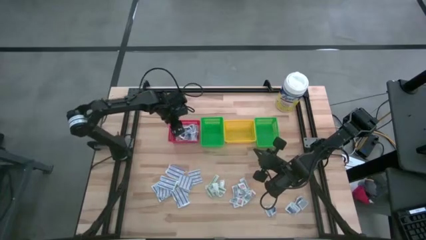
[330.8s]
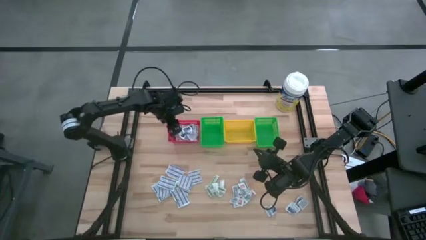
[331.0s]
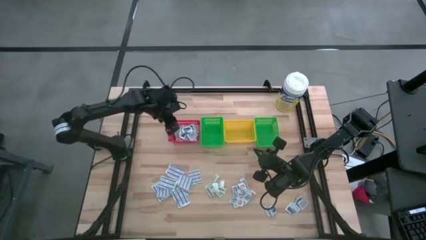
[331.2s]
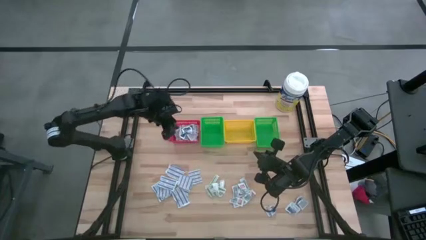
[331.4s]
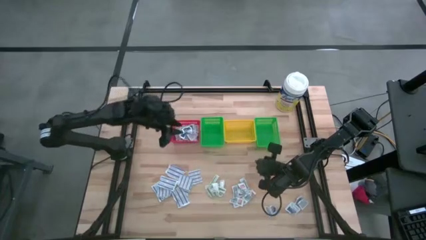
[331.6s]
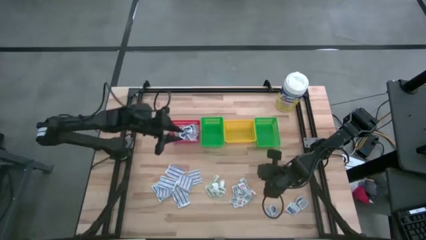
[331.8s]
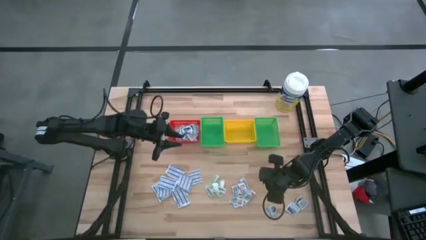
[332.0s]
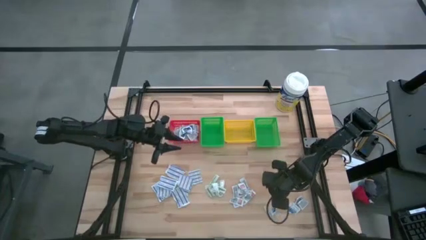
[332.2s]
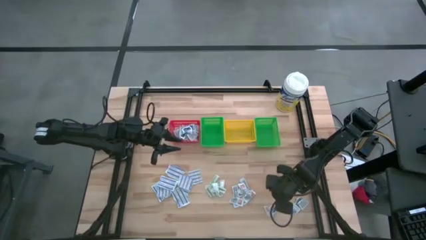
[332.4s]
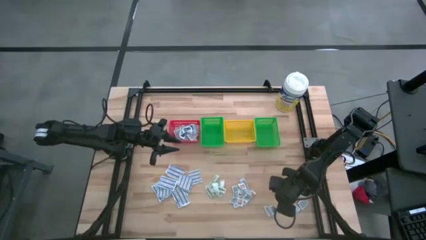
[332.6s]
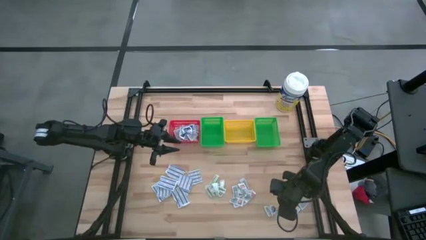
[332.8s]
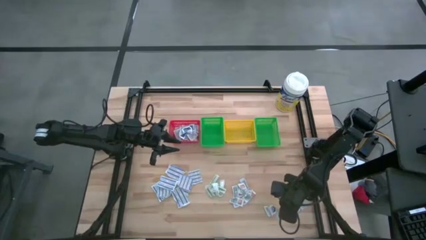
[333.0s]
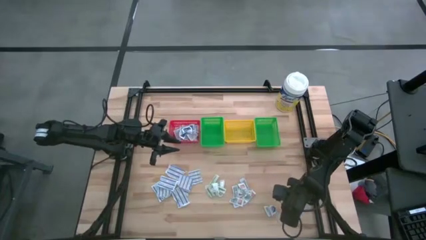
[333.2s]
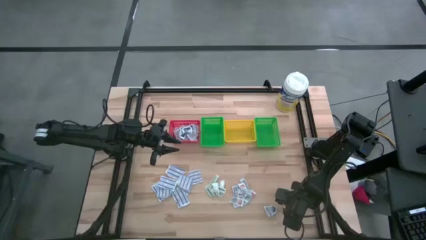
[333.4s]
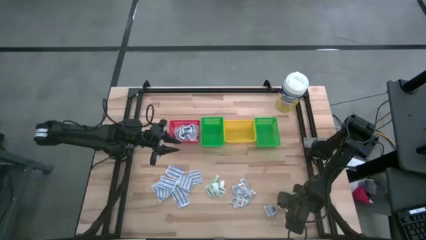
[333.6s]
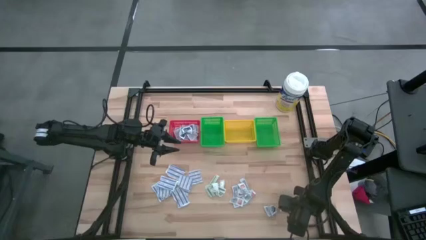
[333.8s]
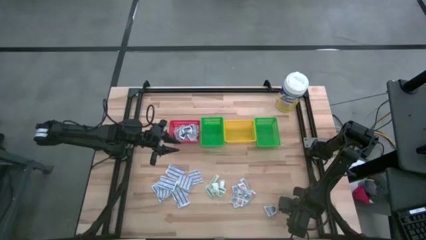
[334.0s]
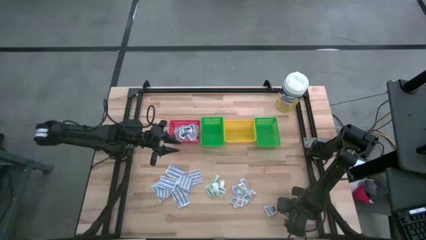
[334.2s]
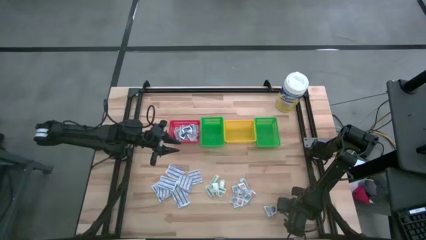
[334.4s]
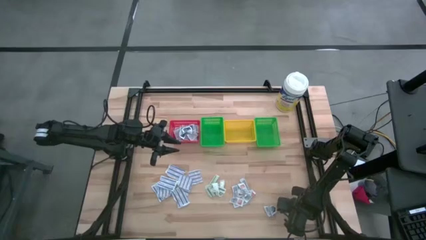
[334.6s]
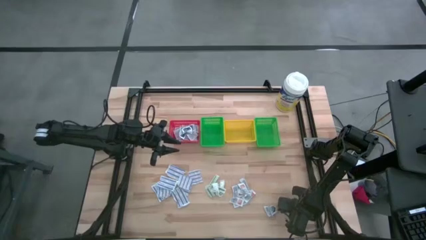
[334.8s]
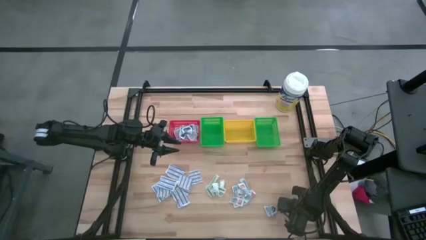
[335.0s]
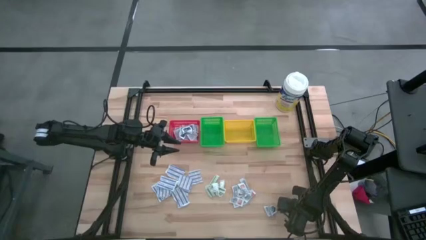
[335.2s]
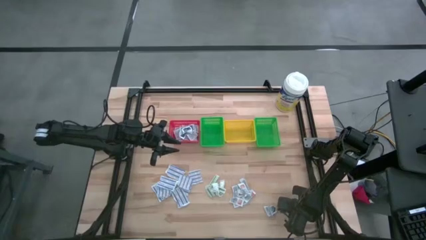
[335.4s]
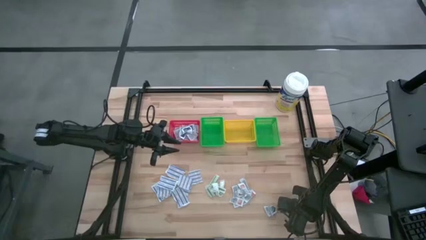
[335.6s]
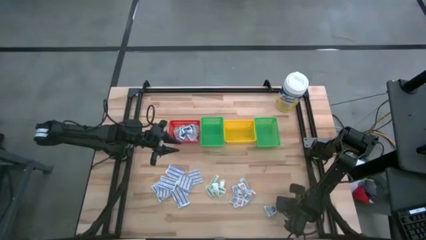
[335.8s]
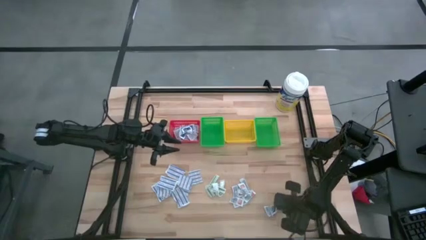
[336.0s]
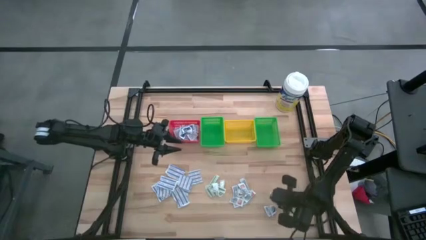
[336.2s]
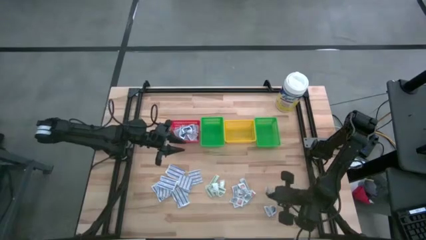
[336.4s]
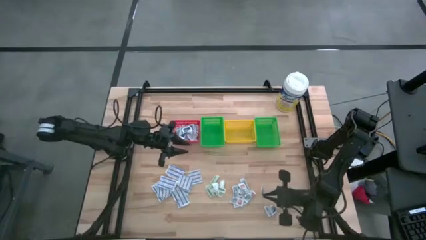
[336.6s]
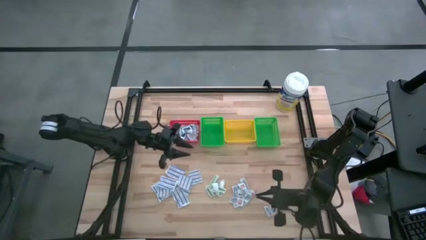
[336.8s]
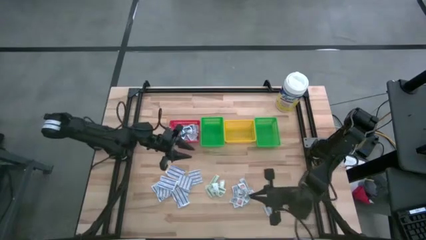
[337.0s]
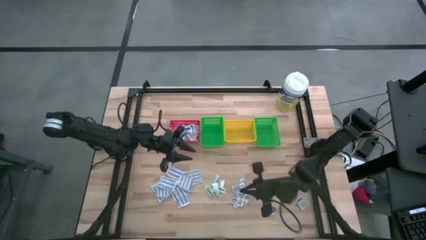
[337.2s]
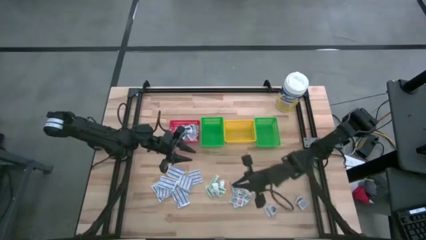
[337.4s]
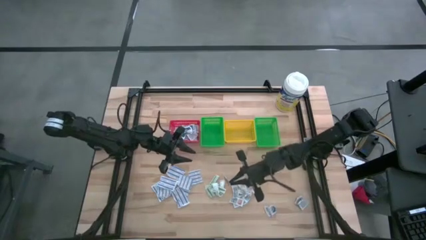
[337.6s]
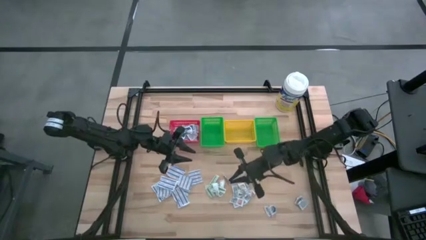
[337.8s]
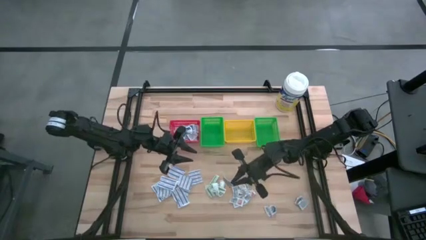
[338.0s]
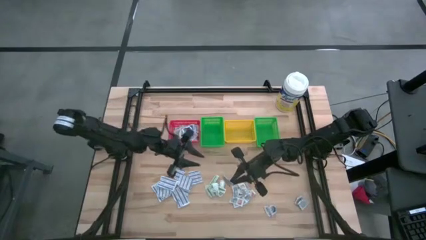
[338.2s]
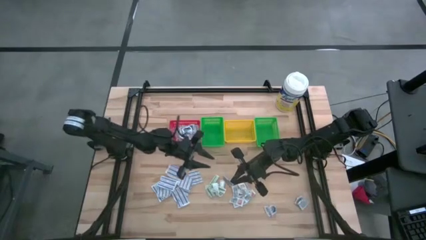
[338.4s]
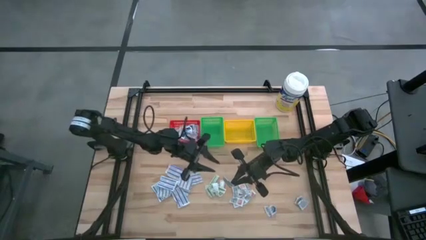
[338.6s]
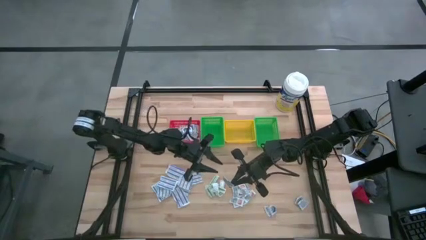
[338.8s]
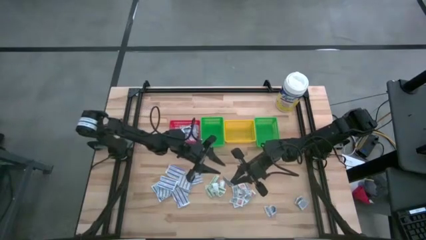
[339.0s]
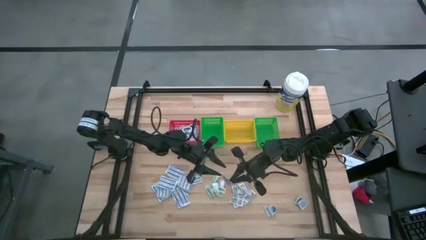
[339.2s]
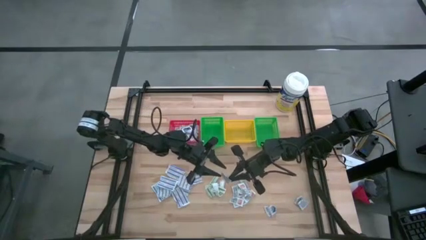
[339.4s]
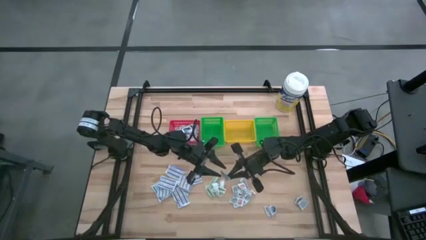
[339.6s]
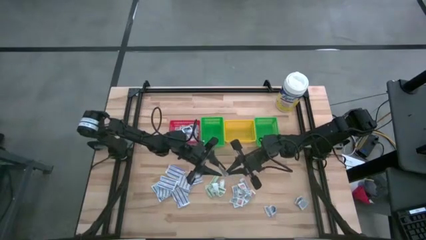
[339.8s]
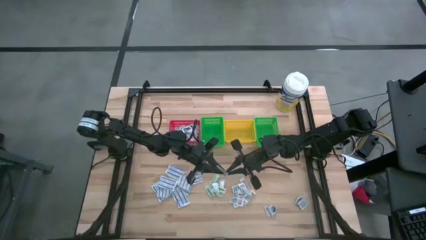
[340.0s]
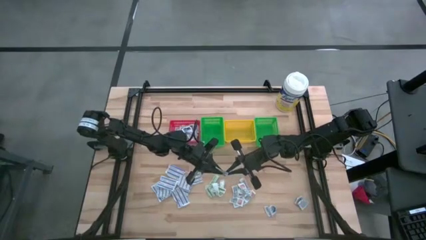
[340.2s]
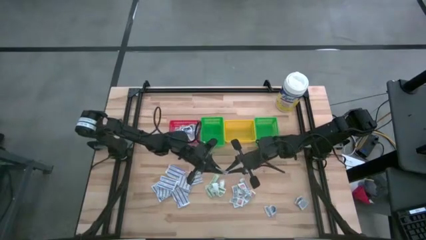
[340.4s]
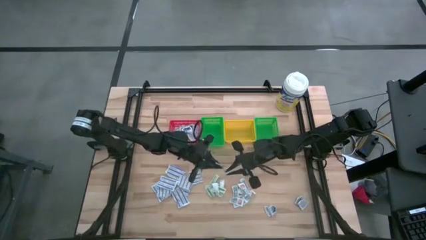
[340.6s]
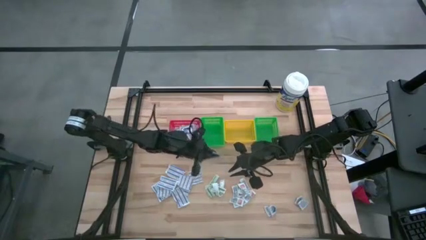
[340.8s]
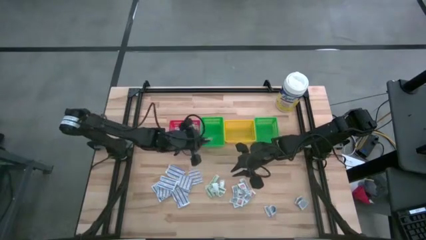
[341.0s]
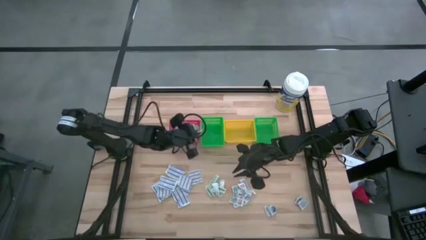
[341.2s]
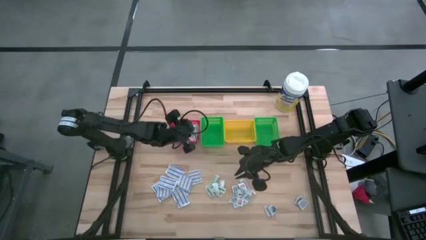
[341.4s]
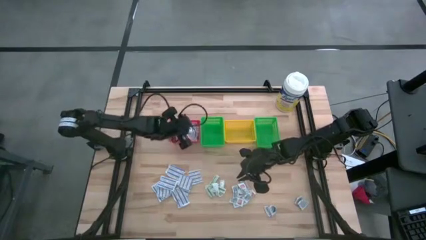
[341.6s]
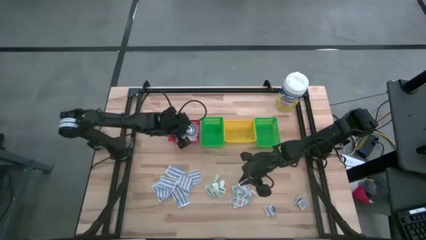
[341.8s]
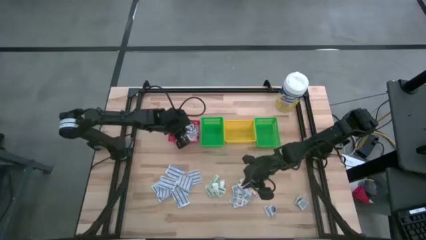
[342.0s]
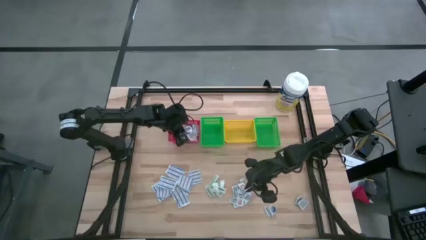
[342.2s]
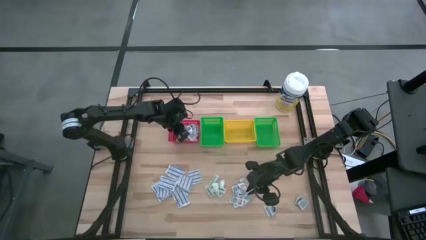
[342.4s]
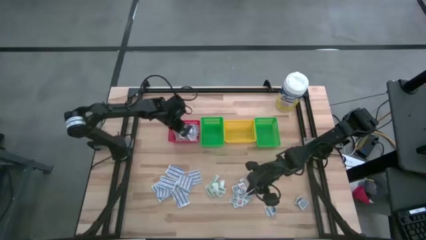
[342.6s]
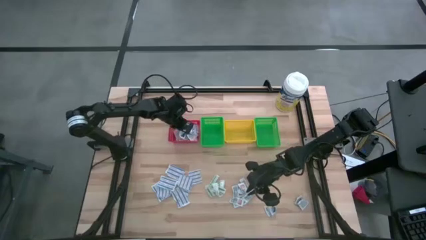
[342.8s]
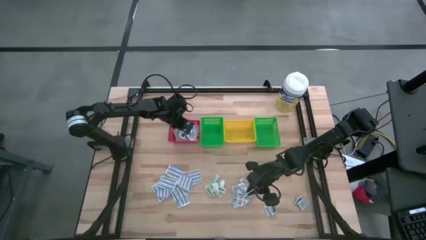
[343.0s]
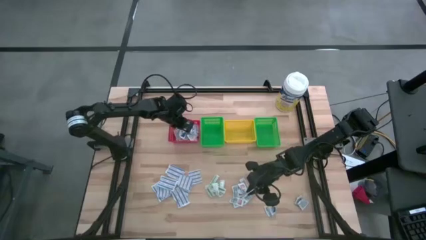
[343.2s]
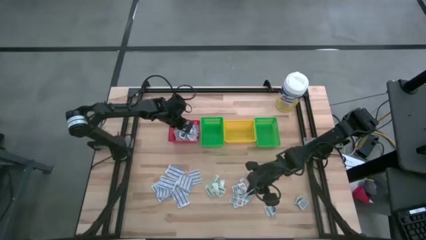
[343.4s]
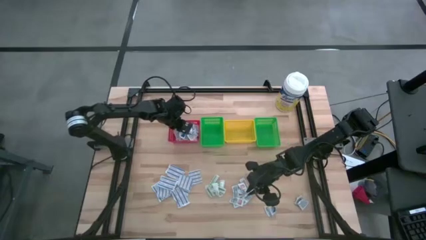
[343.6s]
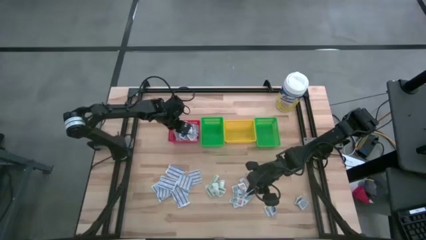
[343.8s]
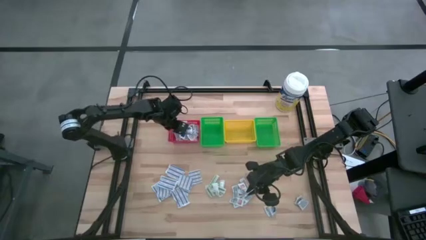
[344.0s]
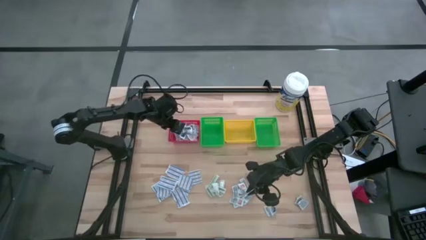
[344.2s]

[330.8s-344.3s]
Task: Pick & Place First Aid Supplies
Put the alcohol pad into the red basket

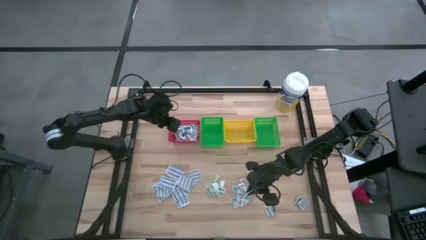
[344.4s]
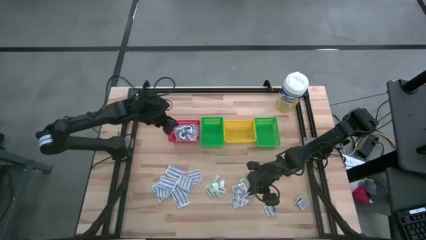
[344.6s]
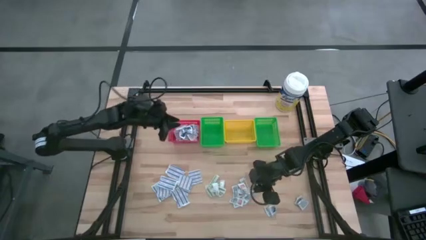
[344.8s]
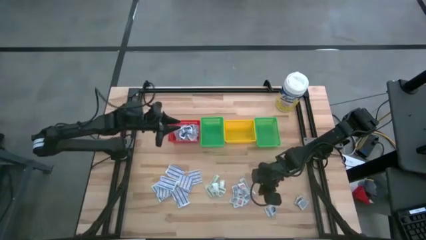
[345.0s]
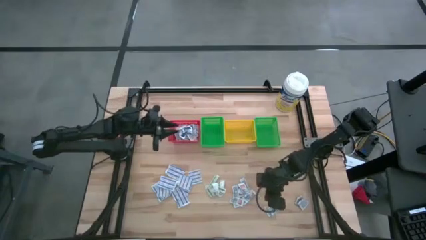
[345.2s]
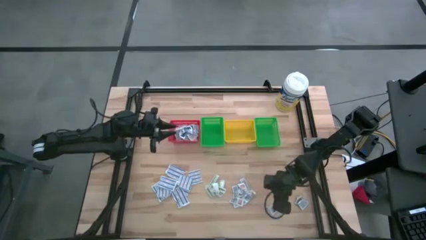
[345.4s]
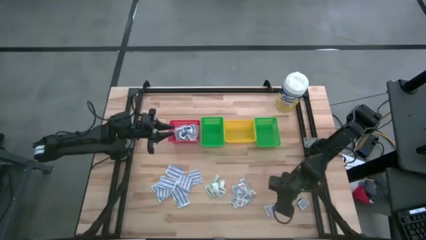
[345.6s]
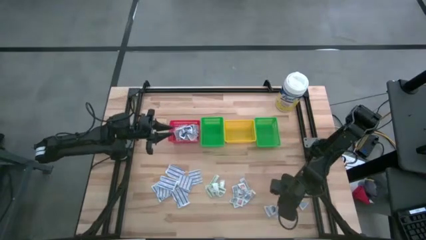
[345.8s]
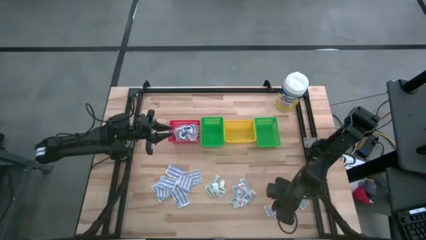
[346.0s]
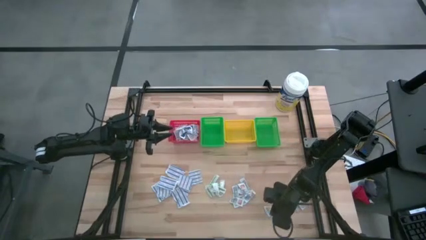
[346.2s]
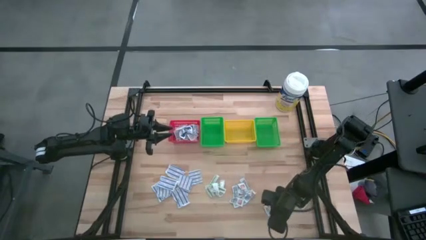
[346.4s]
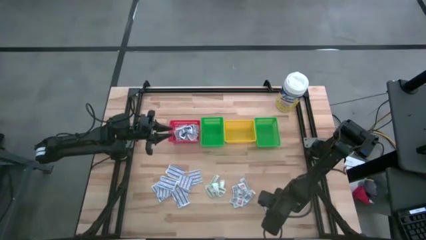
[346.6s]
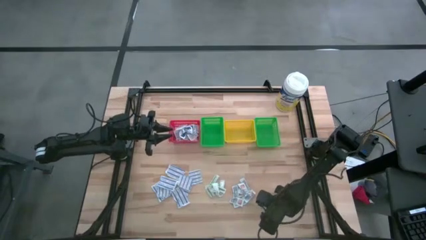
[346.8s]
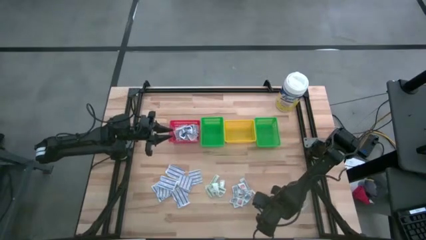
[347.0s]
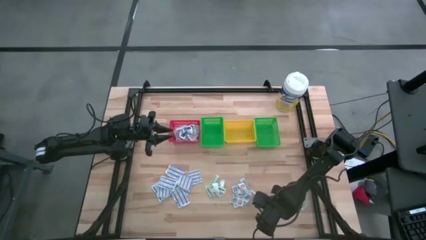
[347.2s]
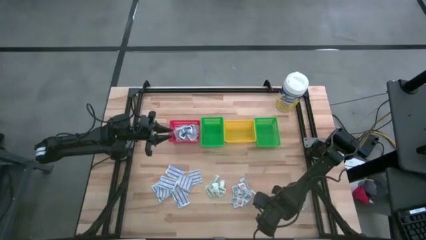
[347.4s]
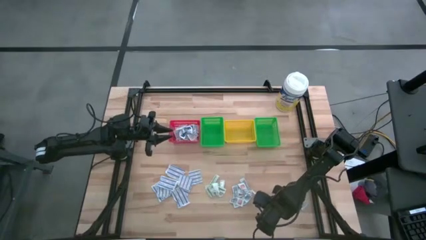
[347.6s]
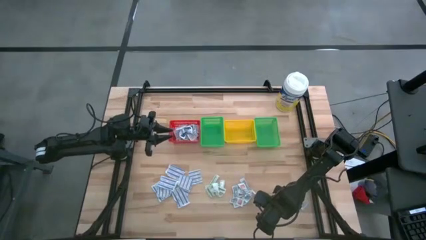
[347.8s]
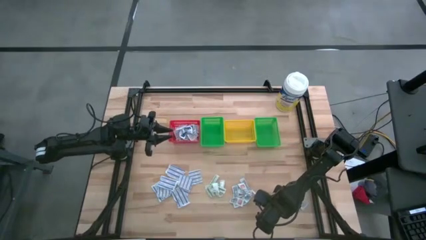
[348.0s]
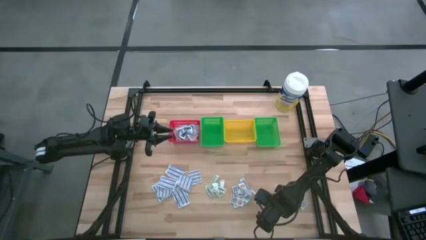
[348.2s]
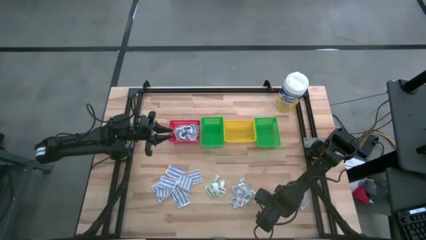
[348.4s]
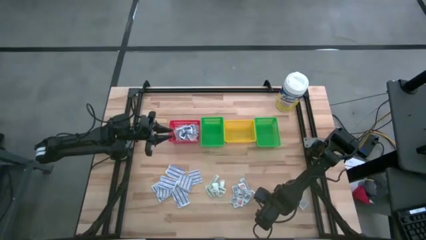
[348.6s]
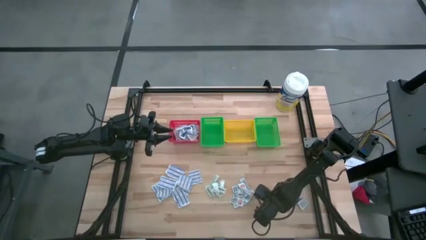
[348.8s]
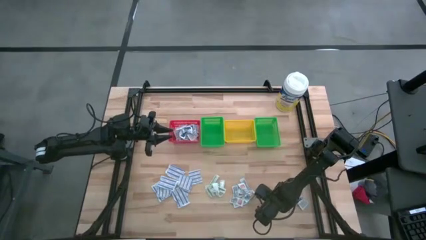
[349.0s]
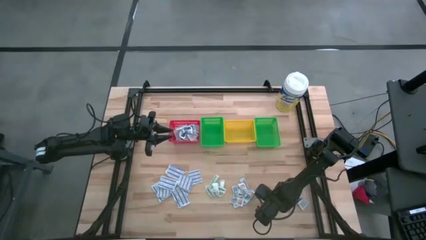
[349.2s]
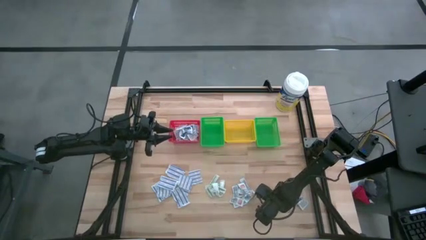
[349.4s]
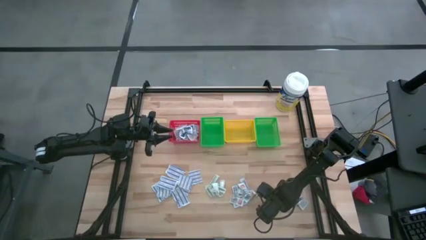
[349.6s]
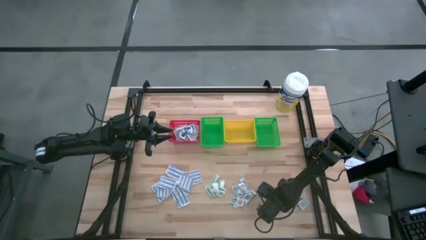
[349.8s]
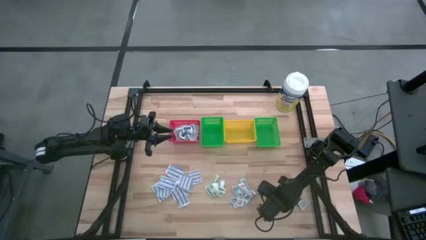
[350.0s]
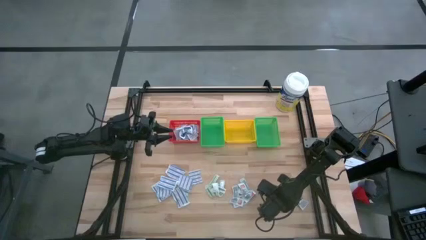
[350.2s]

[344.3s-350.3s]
Put the alcohol pad into the red basket
